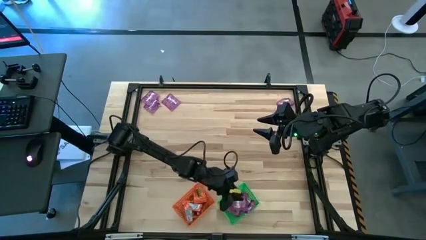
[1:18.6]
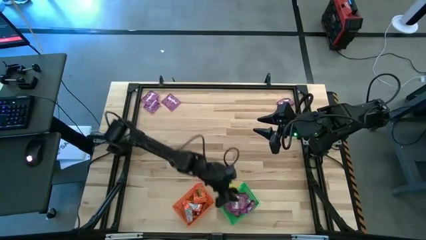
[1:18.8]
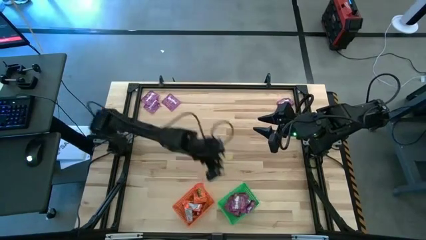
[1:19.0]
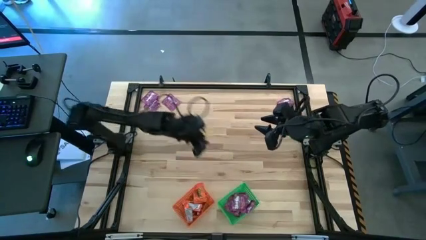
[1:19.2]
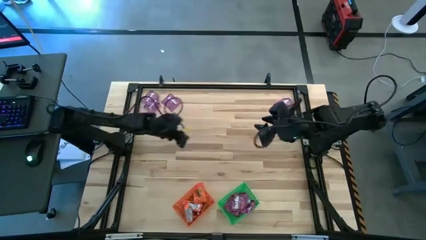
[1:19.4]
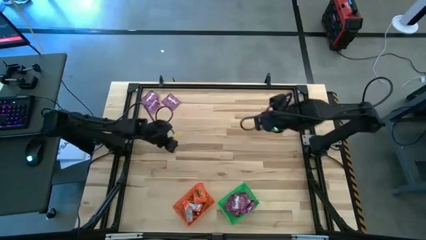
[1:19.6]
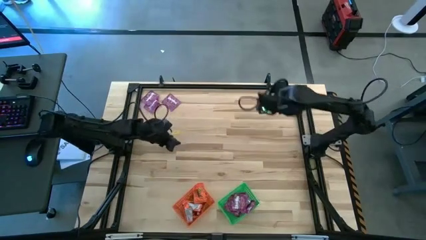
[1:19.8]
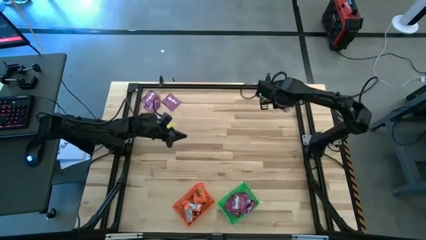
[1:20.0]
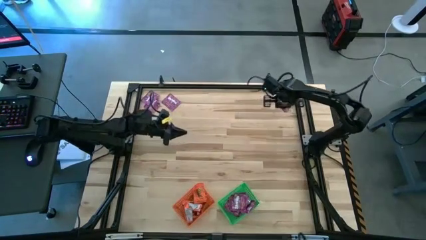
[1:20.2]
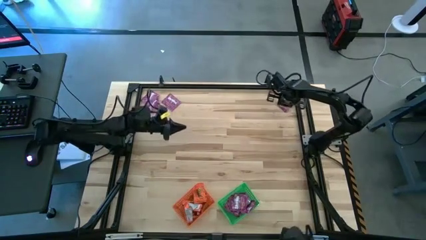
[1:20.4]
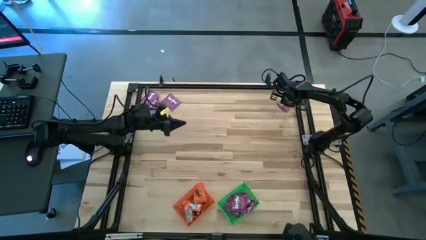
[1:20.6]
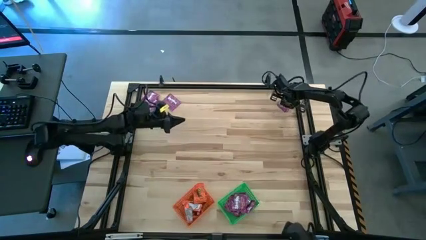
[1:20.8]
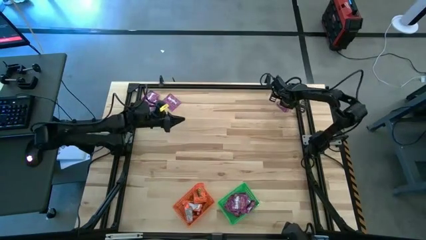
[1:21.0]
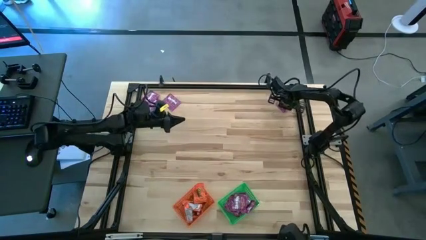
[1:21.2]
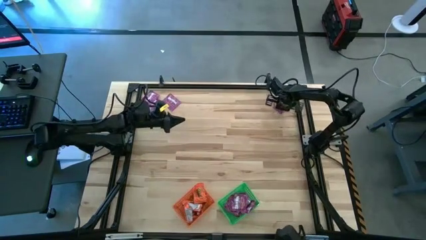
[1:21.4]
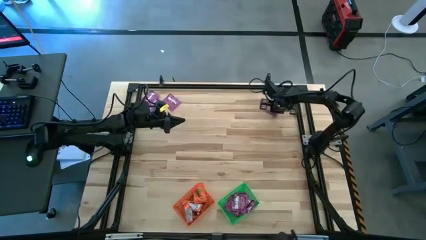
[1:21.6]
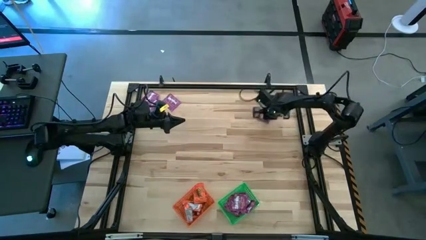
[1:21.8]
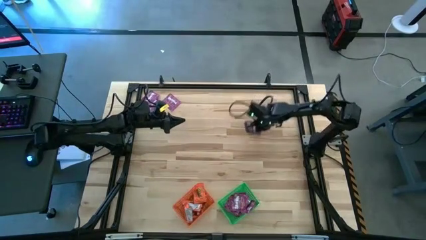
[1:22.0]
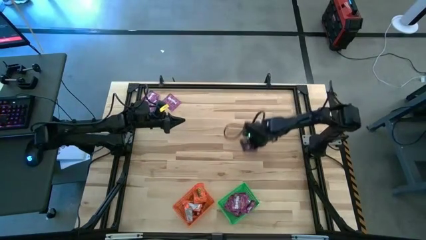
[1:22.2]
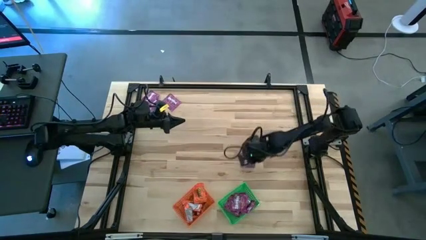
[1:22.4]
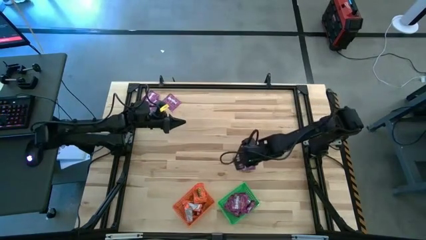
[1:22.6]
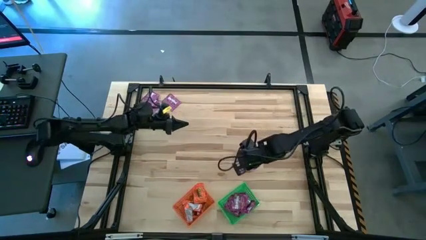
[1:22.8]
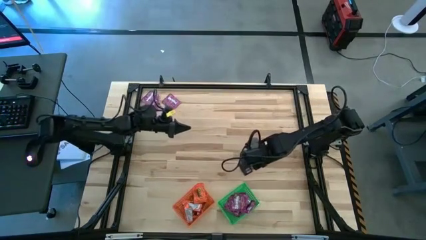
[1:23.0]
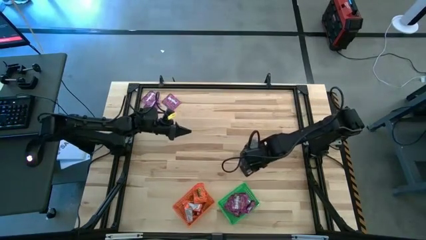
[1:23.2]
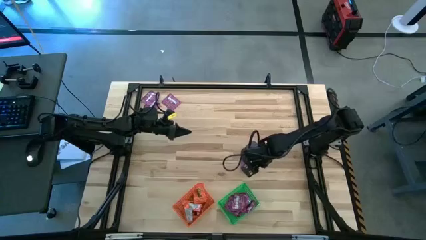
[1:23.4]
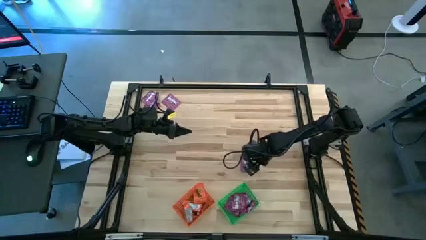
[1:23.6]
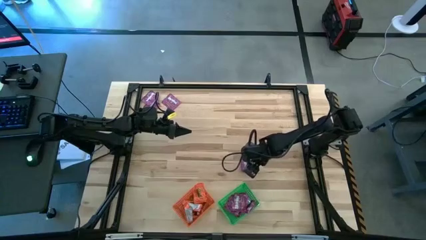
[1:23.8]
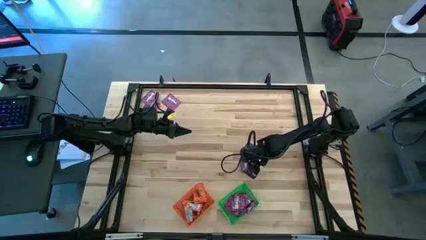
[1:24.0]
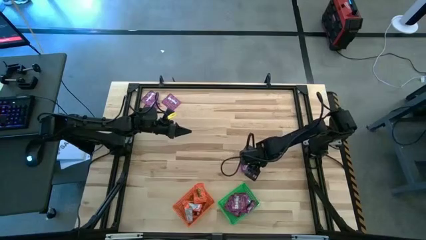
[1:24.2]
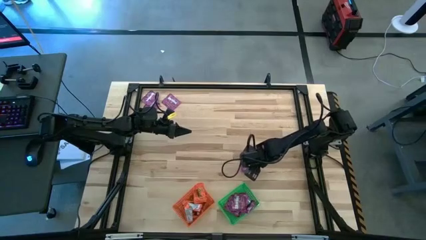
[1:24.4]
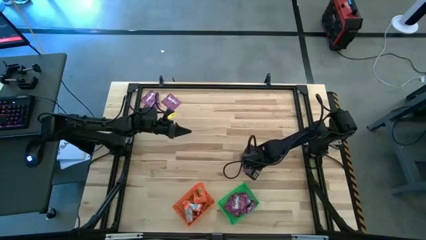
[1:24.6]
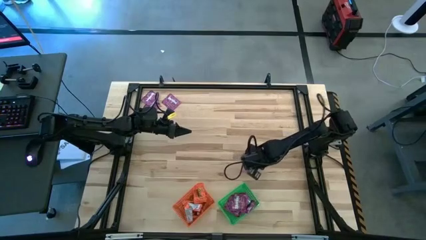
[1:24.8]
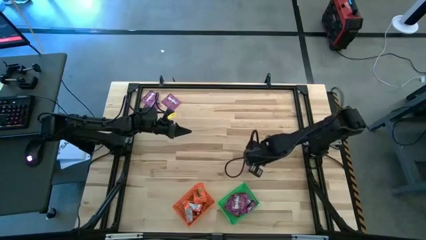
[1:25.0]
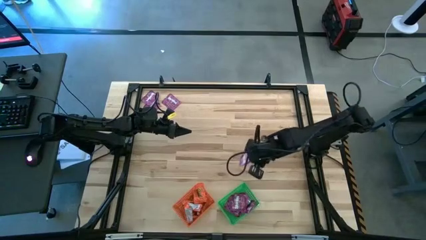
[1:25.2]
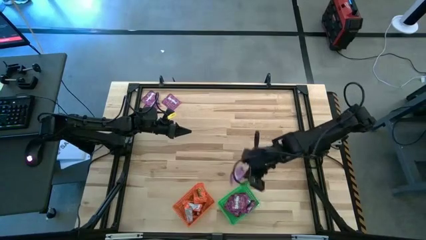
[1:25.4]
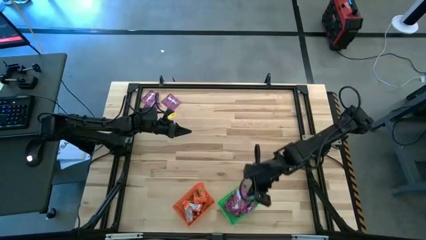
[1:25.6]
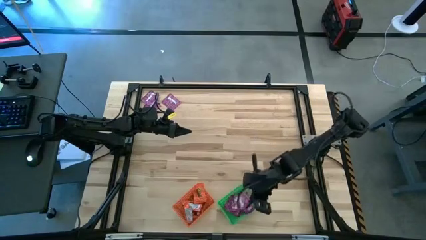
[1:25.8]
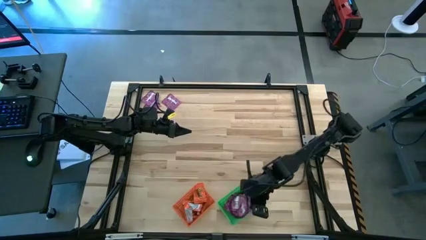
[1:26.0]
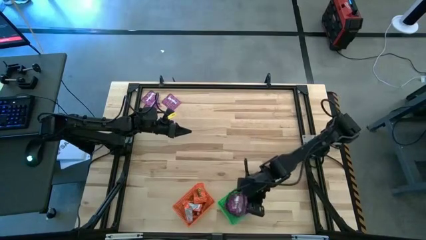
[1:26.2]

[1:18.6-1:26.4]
Task: Sort candy by brand, put in halloween buckets
Put the purple candy into the green basket

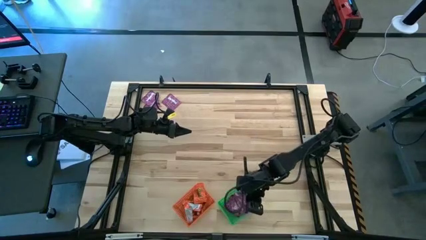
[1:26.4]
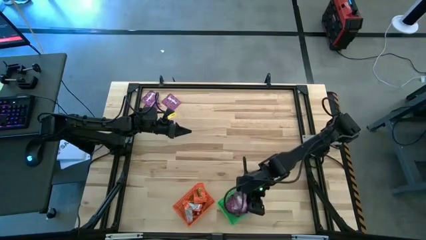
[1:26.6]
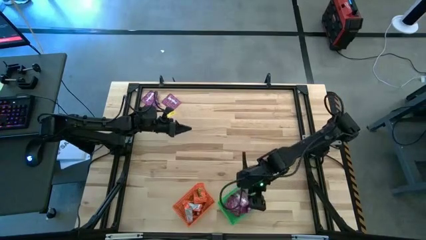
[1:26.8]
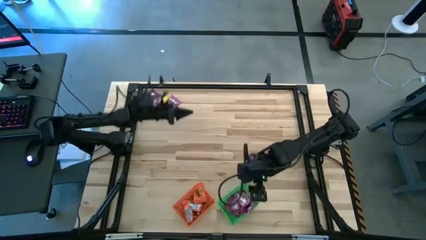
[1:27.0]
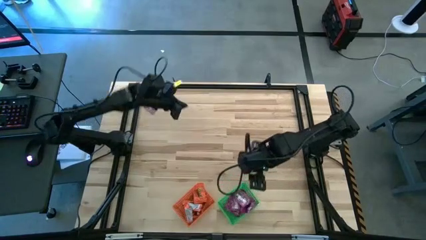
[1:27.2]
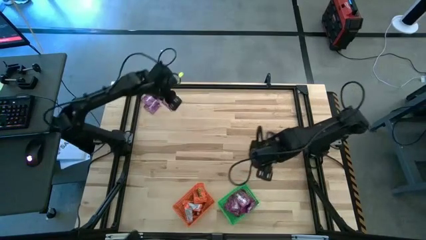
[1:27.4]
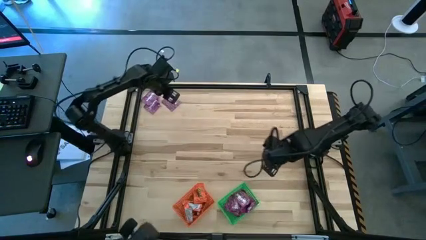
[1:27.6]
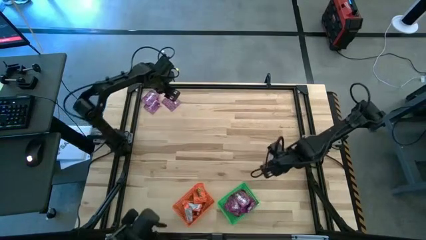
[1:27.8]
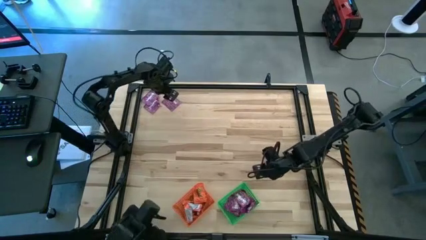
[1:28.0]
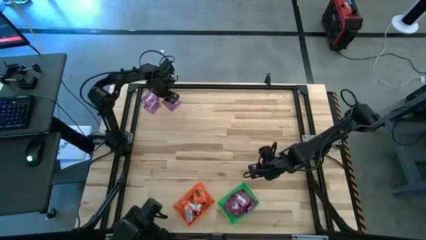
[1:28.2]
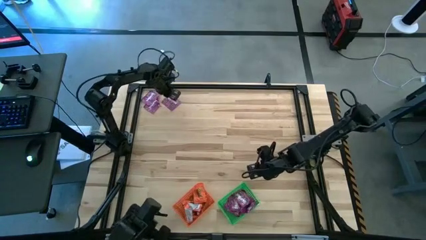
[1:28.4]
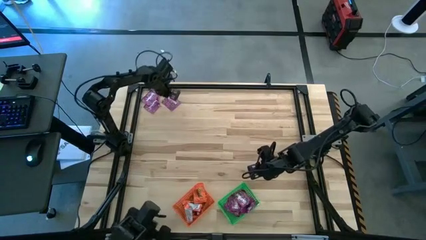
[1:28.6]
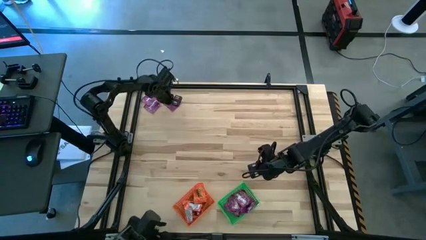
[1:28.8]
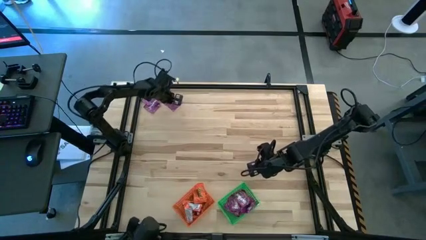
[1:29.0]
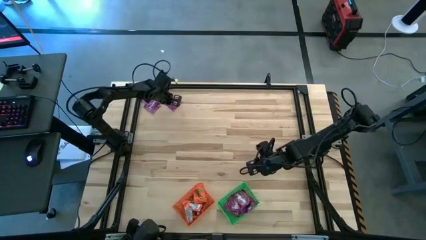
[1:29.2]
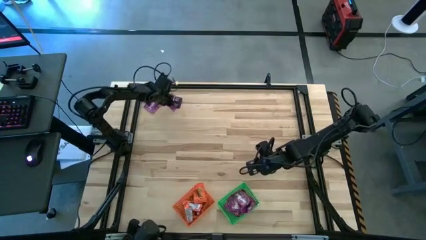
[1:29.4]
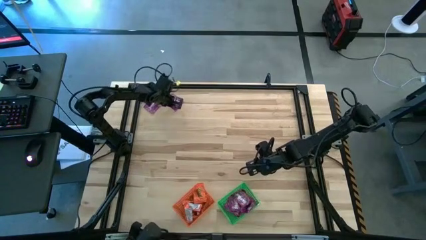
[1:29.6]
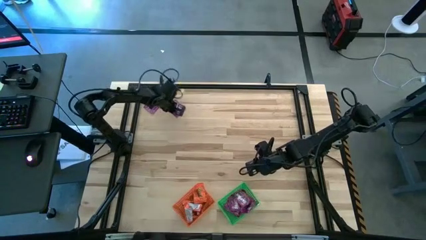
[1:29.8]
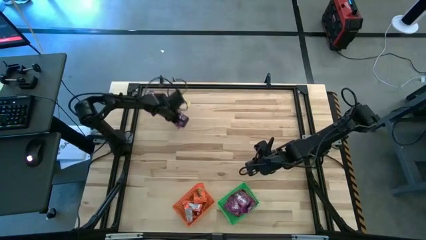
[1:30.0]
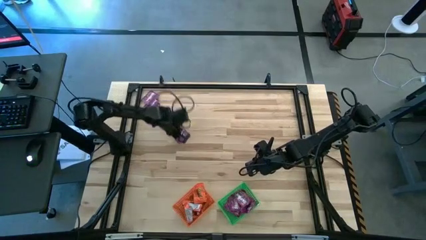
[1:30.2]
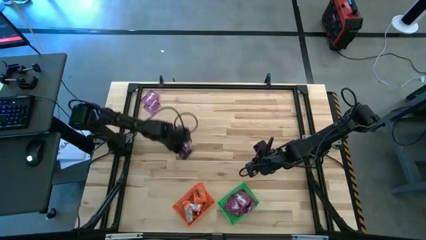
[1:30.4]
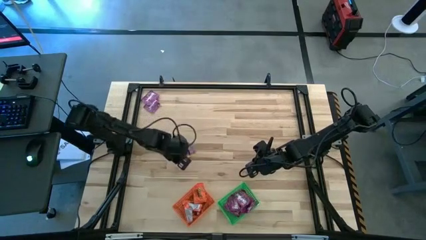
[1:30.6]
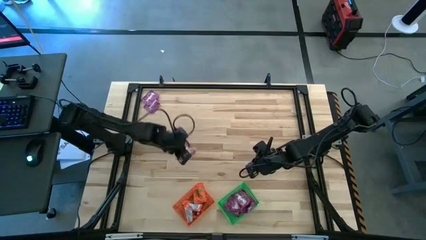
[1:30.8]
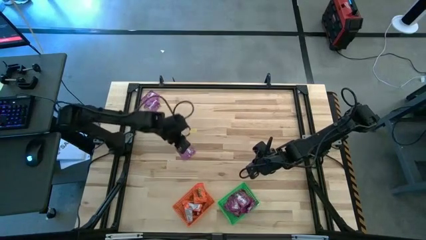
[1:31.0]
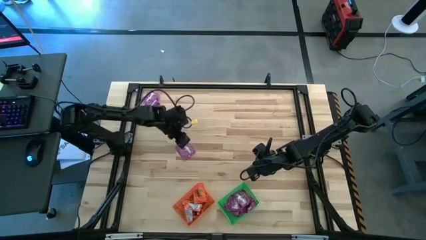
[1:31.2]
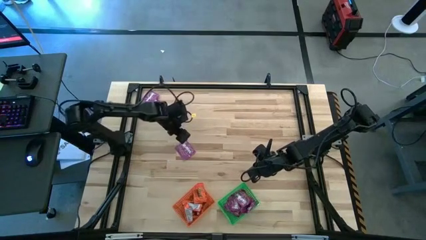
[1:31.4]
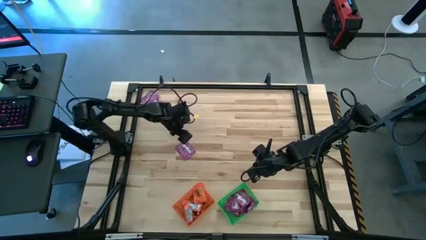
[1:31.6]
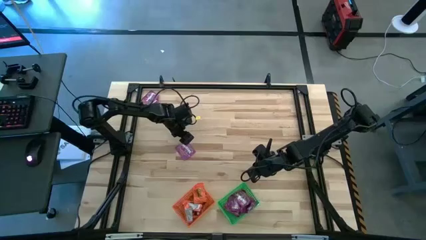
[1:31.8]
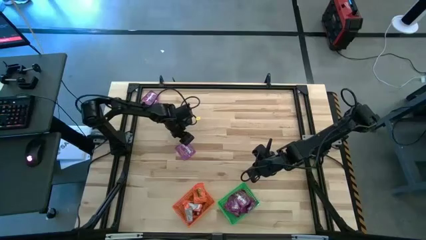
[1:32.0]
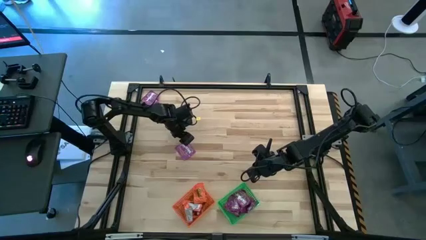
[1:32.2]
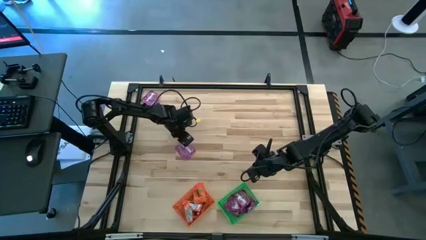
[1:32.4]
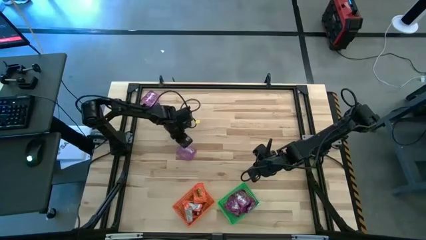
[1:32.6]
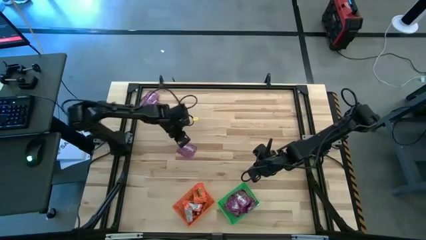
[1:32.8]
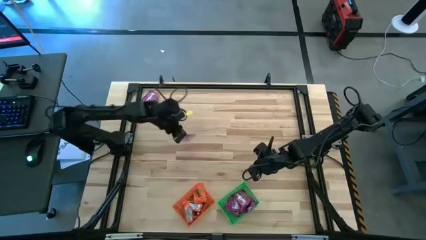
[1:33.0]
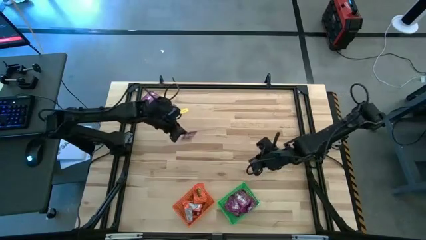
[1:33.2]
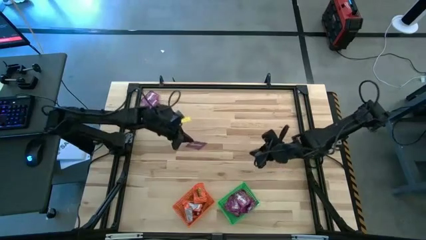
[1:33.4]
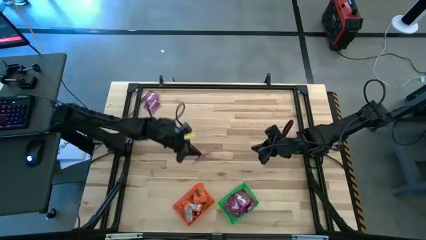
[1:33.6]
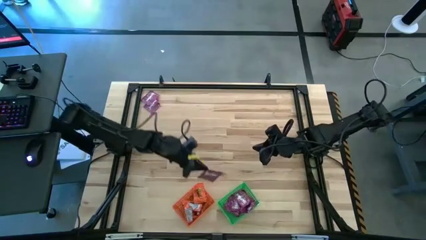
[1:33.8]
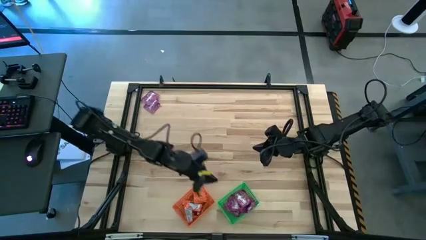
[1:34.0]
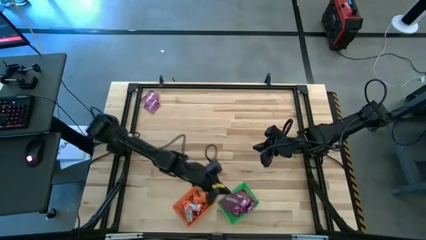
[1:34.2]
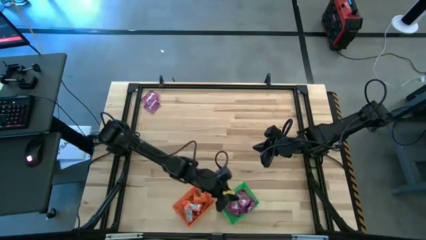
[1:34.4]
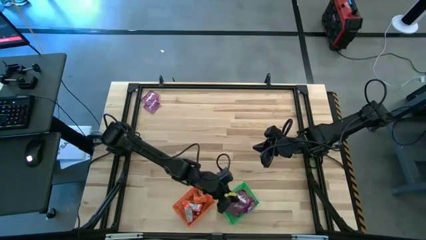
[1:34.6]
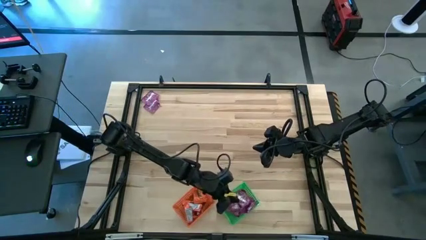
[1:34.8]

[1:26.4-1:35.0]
Put the purple candy into the green bin

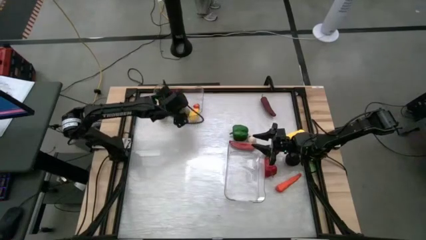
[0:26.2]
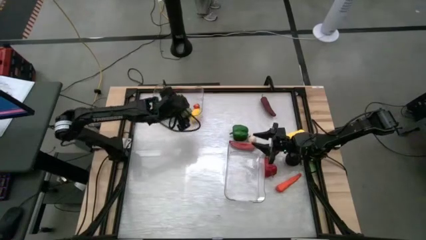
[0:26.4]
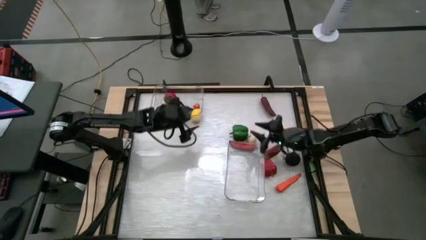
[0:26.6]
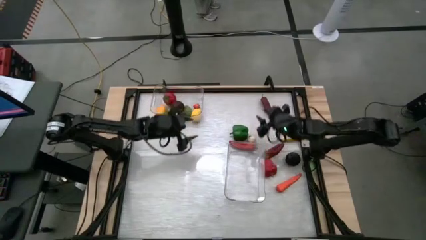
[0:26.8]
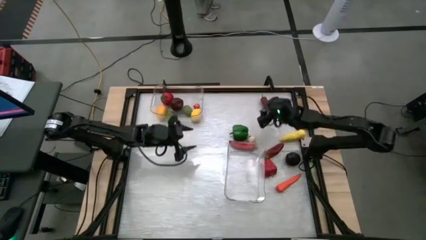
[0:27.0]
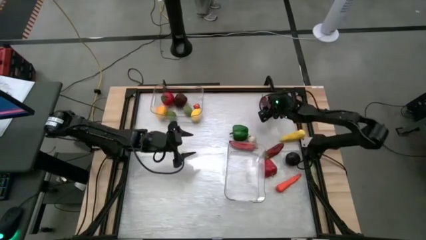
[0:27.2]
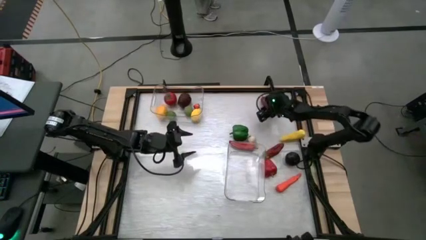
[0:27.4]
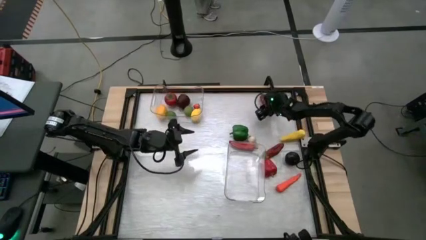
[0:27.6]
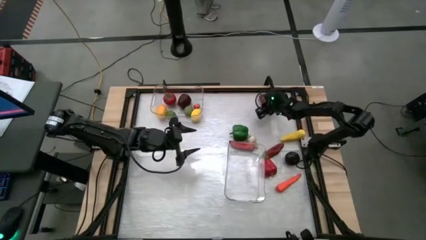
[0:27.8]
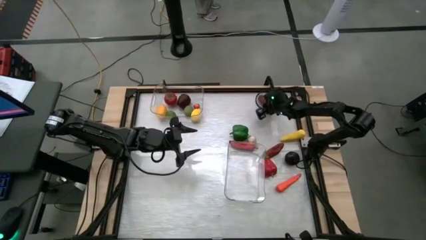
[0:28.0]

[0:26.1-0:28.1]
Task: Sort produce into baskets
Put the top red chili pepper into the bottom transparent bin
